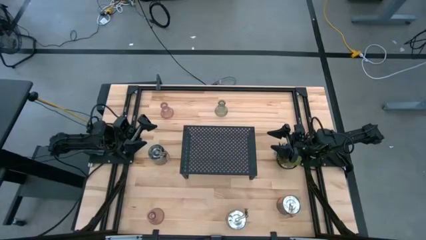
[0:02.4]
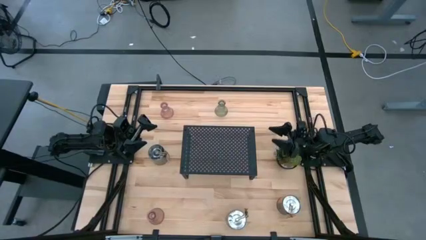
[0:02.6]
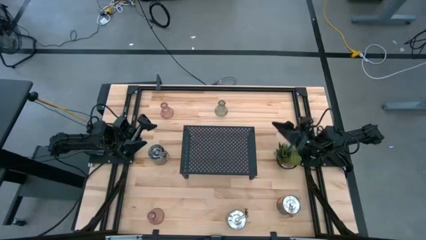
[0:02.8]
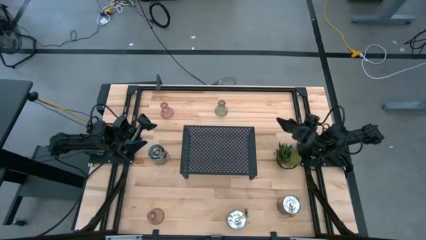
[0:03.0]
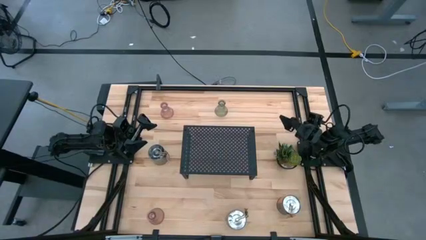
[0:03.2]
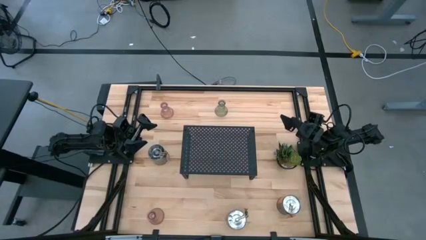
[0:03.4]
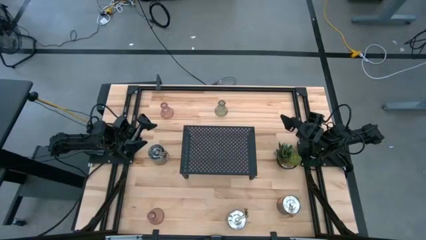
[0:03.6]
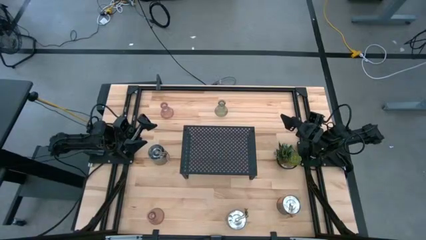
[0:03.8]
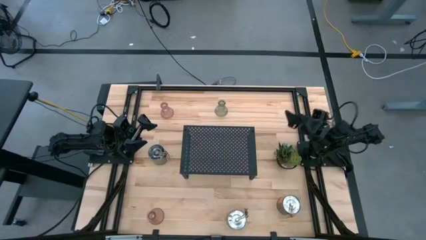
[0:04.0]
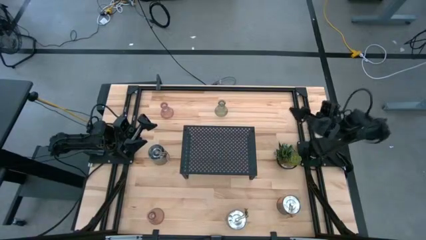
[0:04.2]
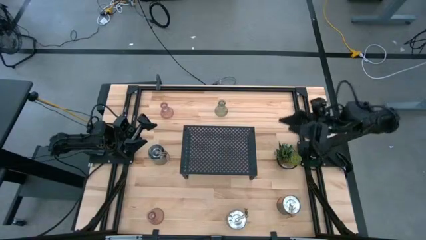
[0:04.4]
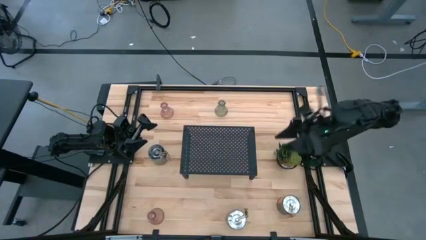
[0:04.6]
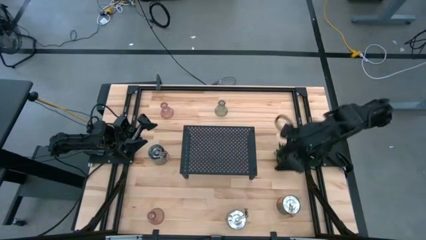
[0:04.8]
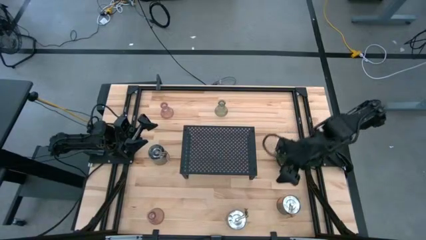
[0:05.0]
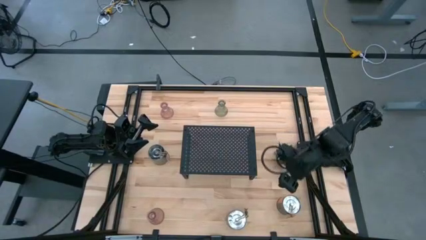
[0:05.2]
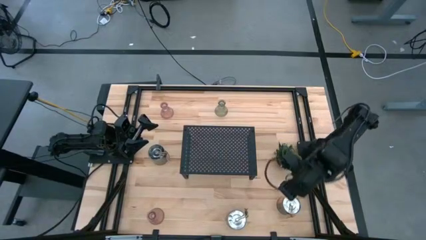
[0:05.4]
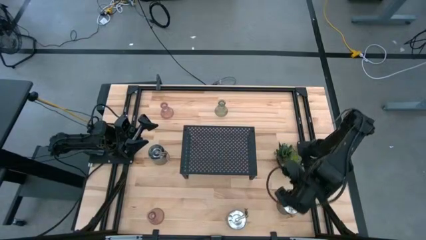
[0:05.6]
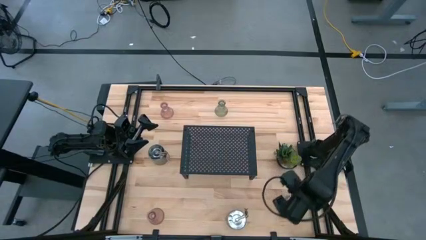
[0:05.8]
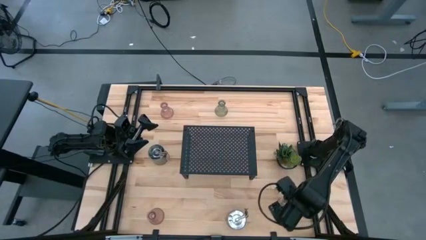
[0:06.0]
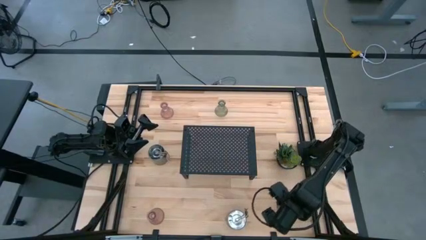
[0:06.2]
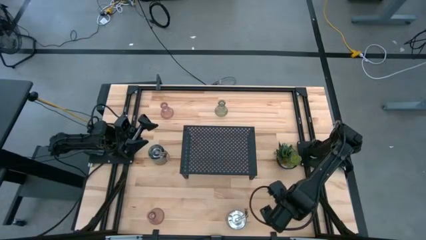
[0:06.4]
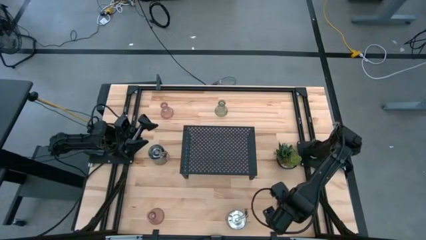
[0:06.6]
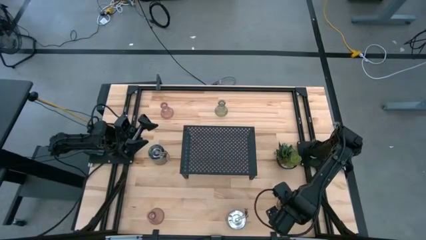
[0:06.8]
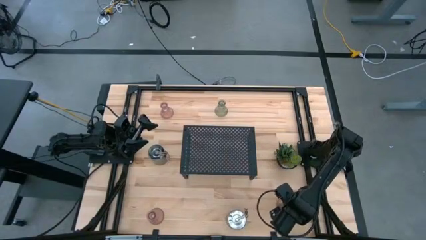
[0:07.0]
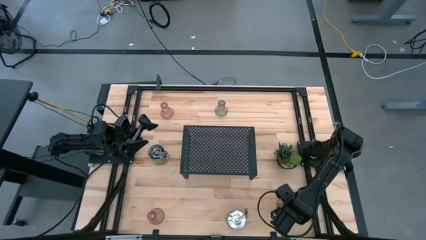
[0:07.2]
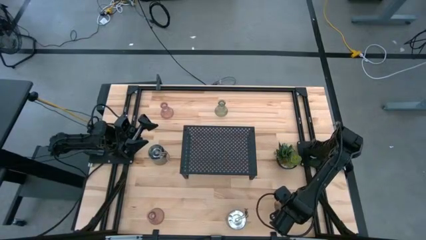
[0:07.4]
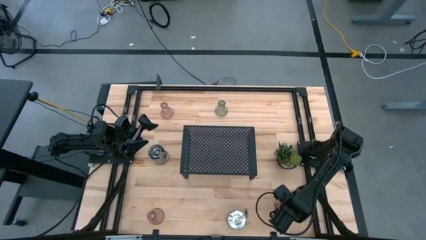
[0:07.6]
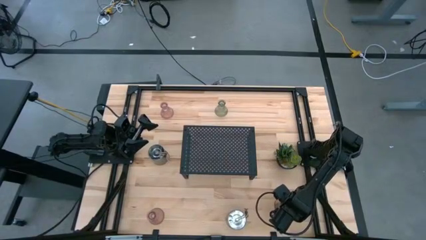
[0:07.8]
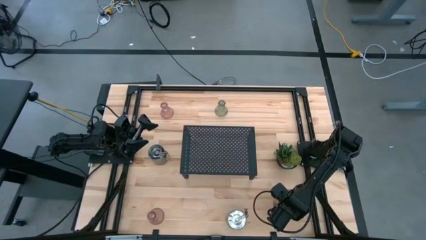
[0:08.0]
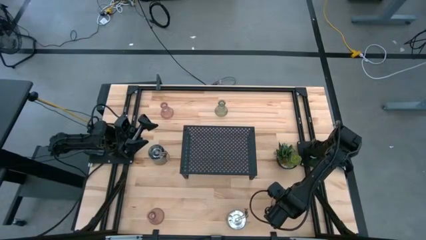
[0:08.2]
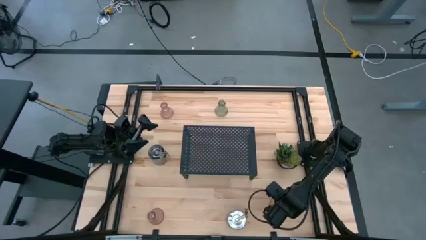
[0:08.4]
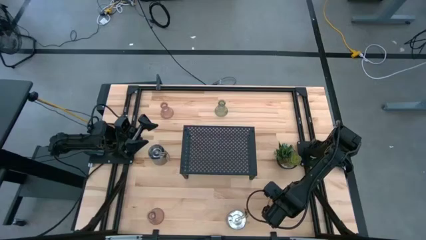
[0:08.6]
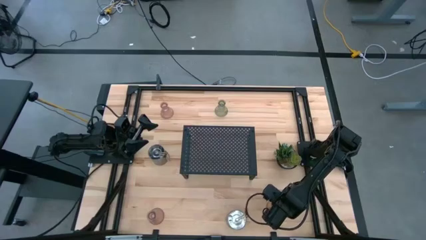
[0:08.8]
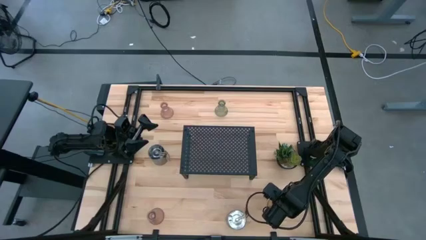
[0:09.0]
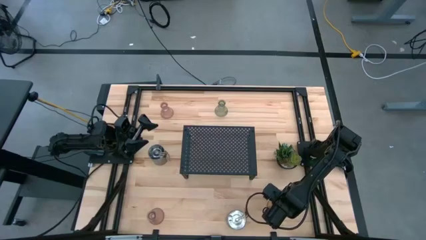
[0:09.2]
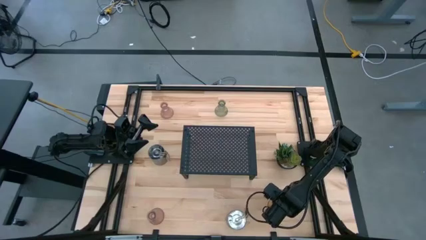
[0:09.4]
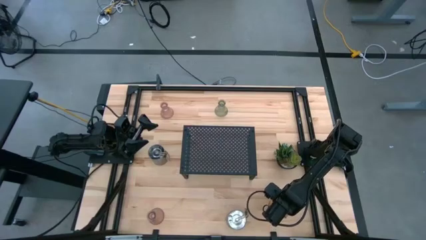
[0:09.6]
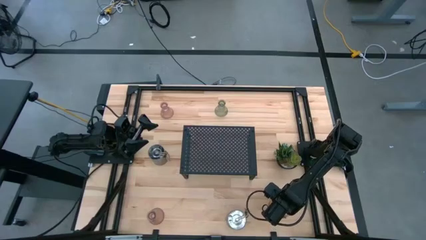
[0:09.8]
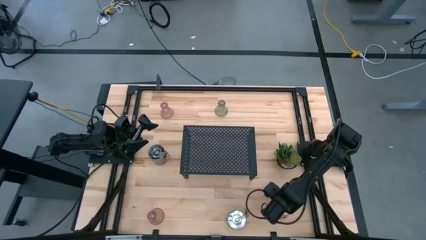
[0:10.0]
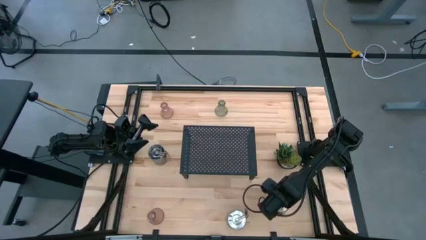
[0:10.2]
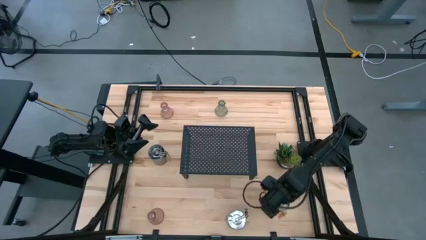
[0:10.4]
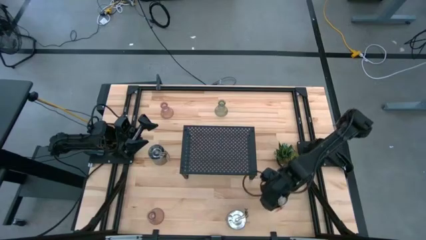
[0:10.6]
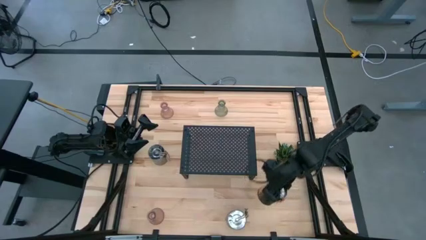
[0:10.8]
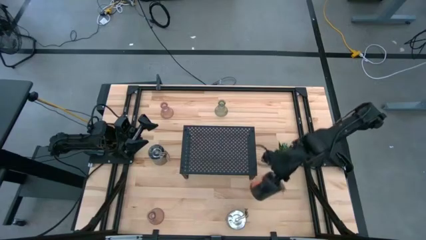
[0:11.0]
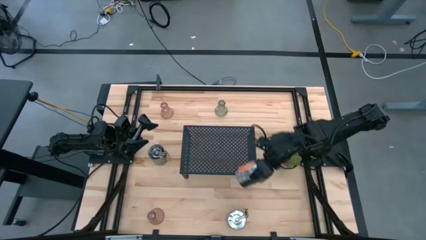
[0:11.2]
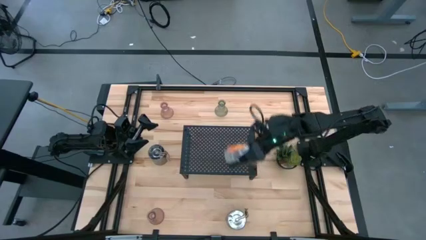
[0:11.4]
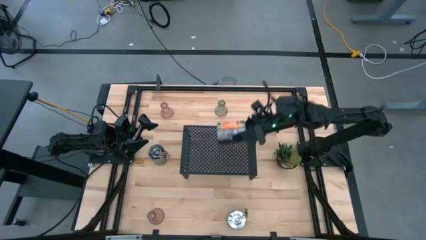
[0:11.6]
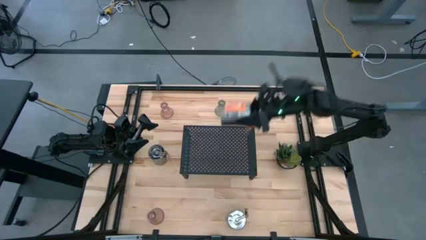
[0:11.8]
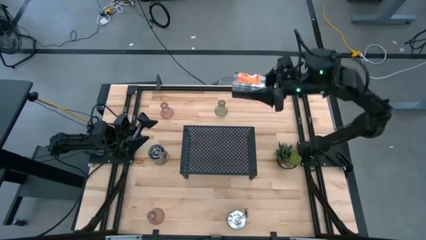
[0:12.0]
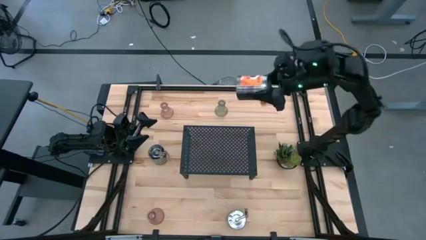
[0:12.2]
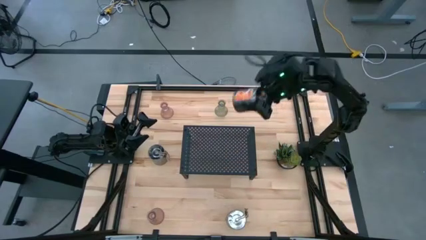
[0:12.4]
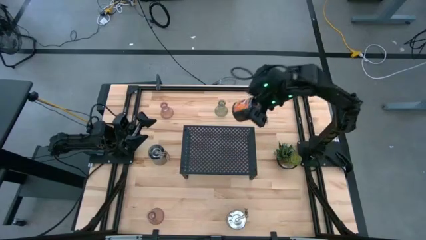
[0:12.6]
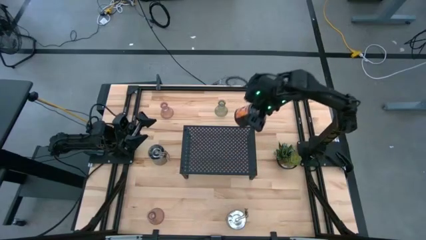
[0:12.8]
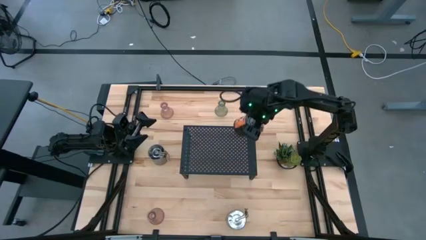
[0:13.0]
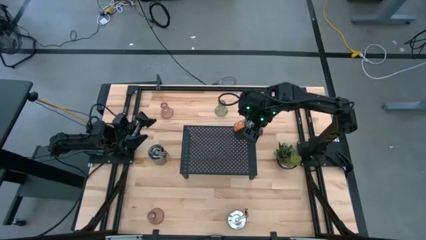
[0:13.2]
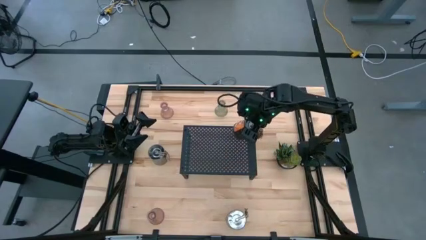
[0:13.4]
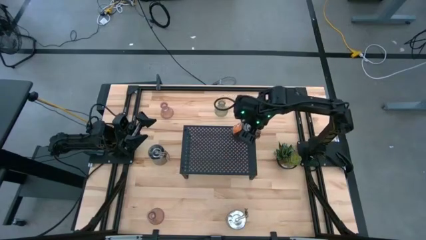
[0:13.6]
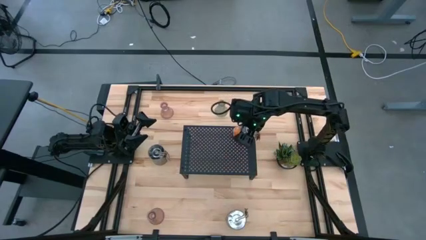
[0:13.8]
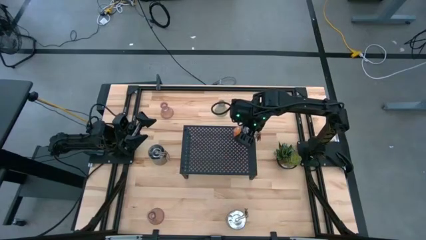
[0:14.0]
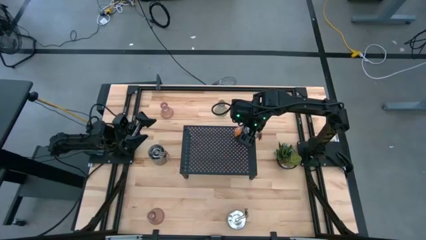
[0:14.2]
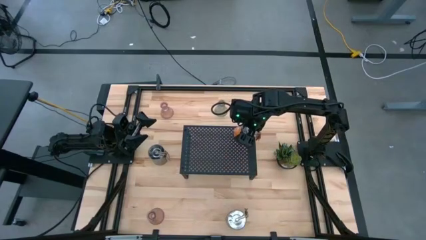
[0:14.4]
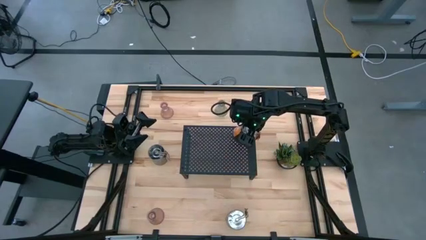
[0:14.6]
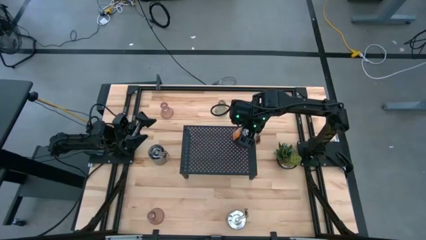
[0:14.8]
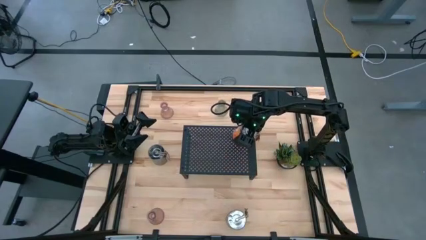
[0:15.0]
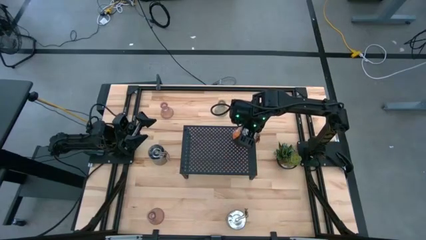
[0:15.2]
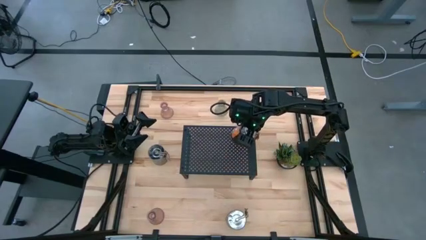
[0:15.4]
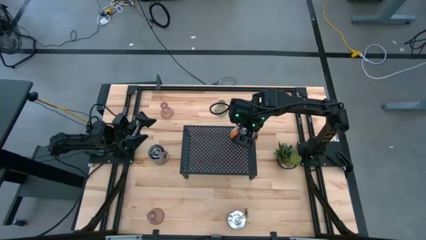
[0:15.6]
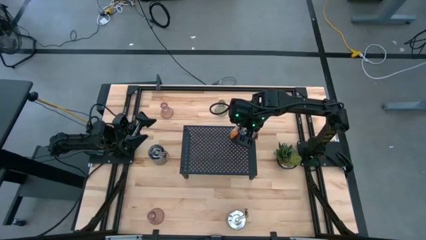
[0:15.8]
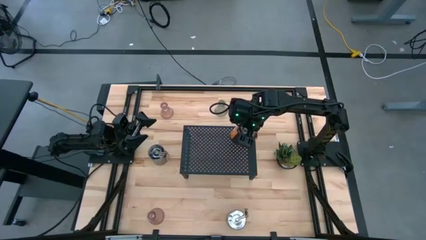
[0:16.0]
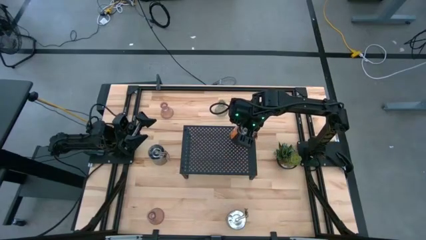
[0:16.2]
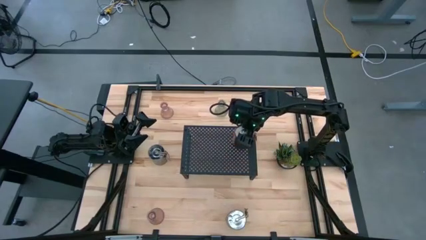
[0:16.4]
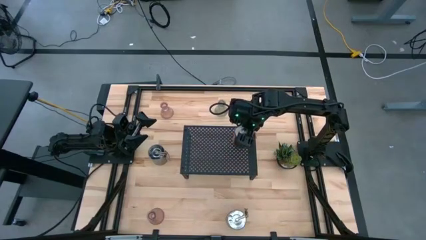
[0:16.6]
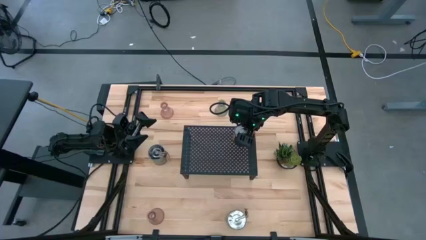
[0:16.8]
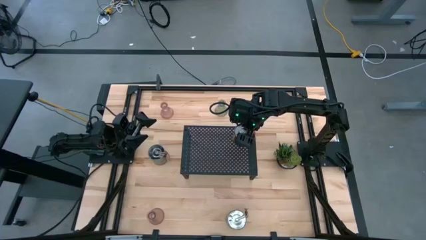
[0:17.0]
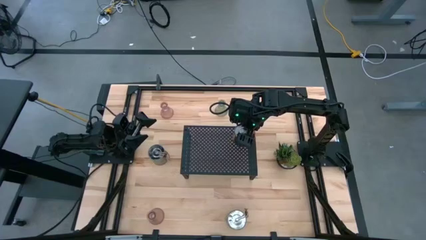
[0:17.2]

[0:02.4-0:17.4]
Task: Pick & Place candle stick holders
Put the orange scented candle on the shelf
